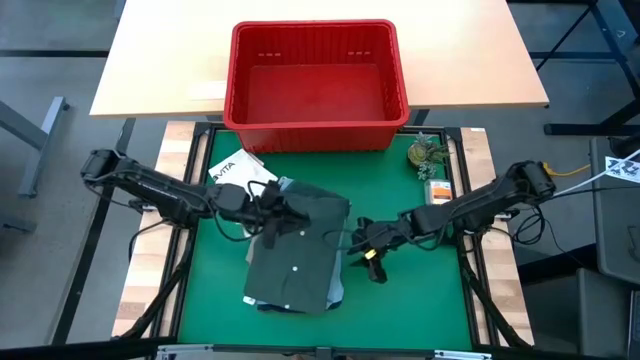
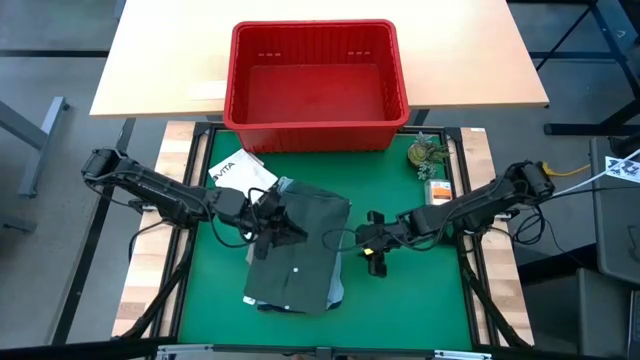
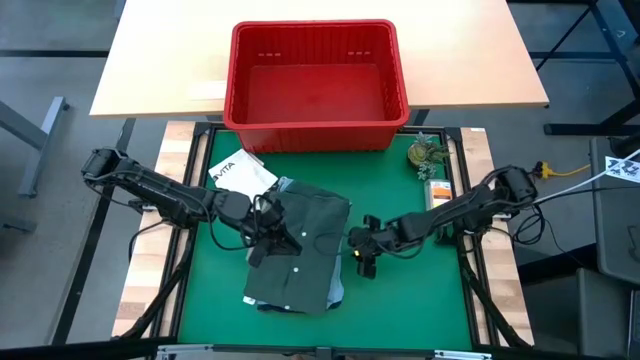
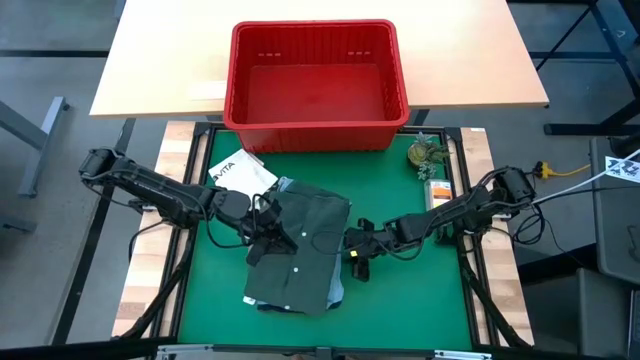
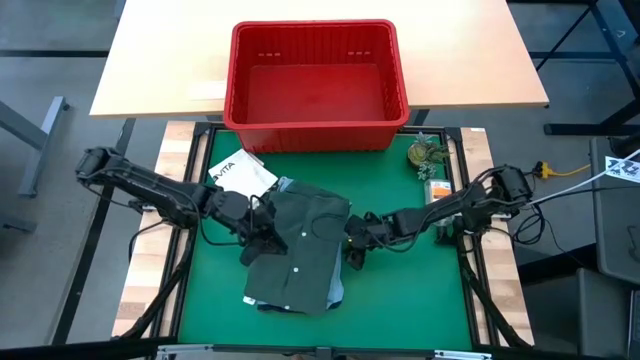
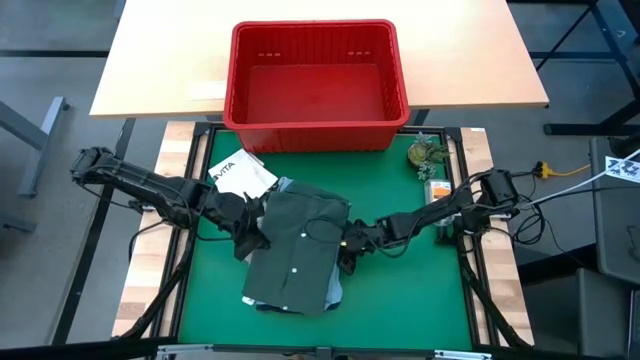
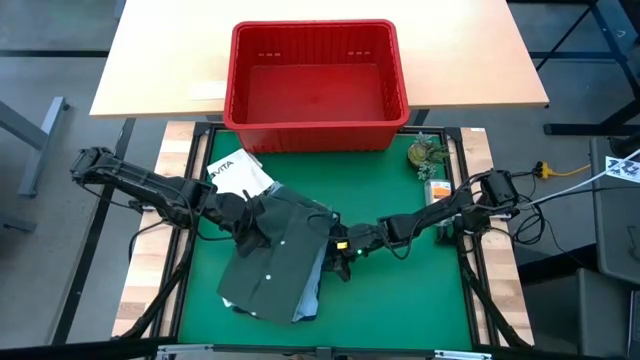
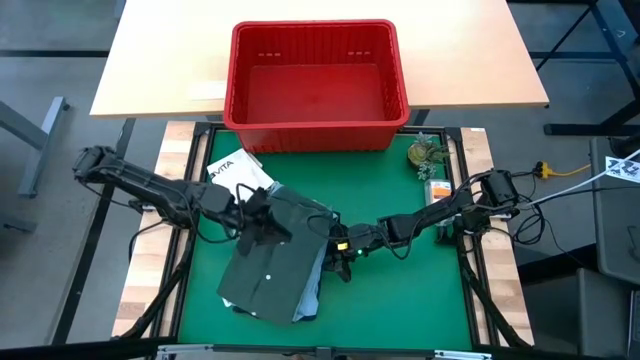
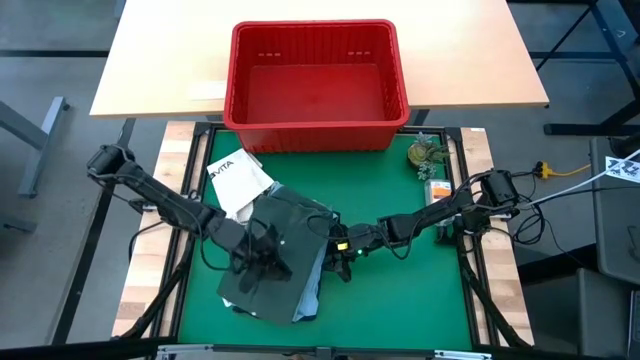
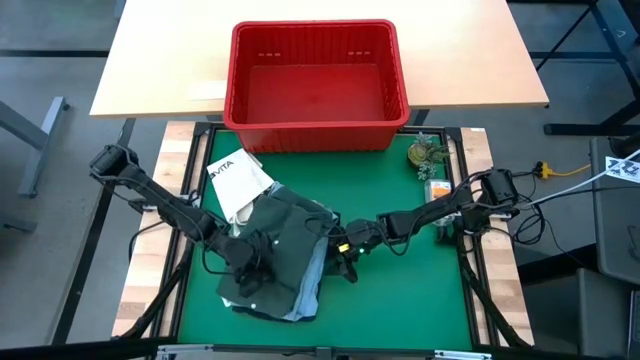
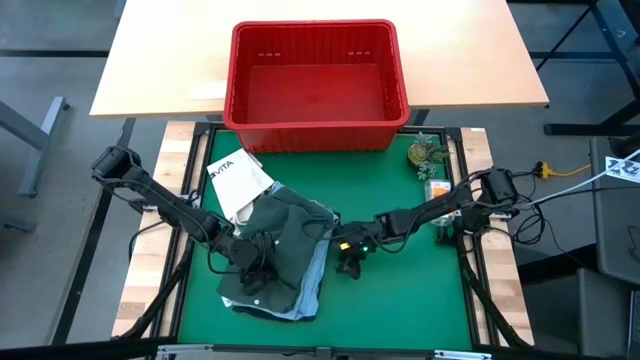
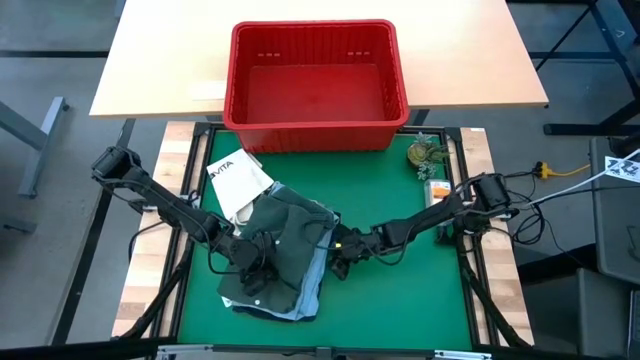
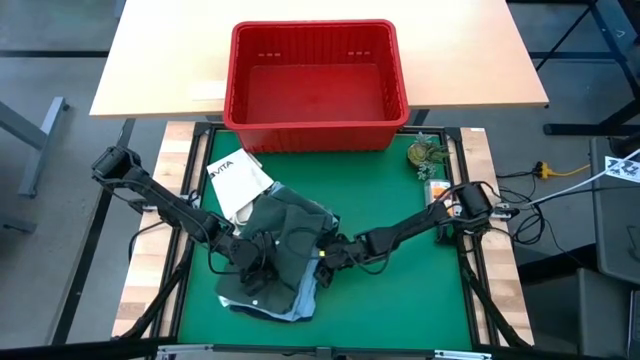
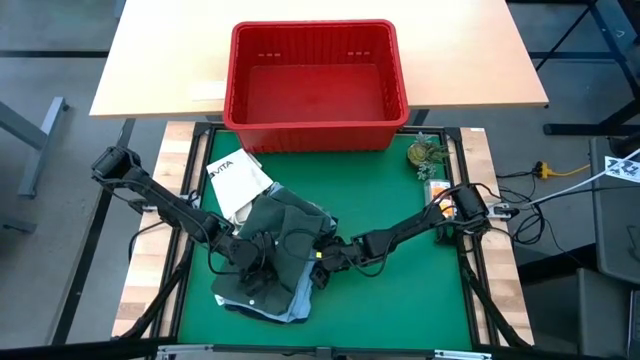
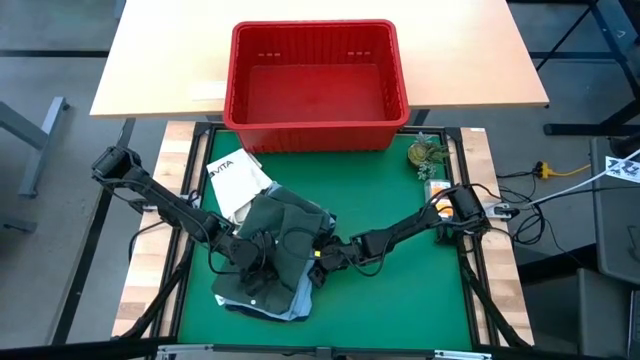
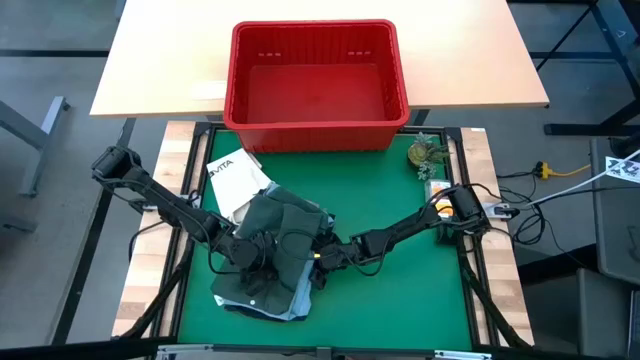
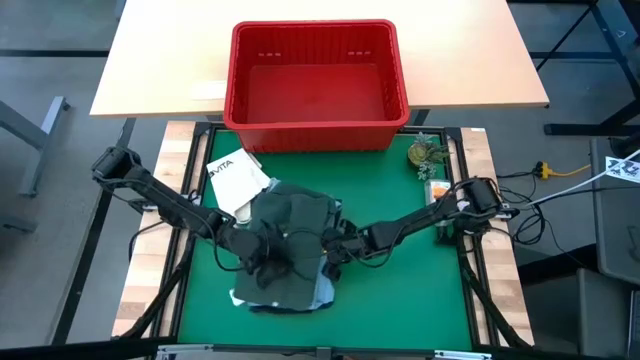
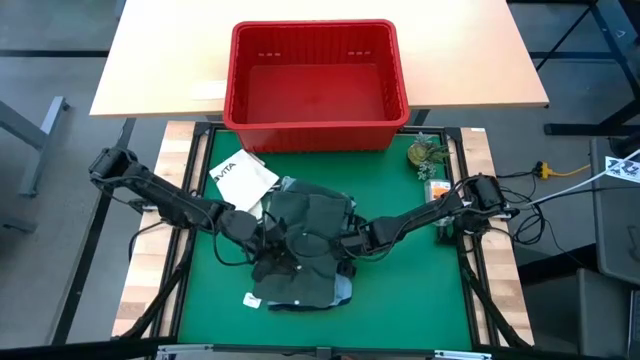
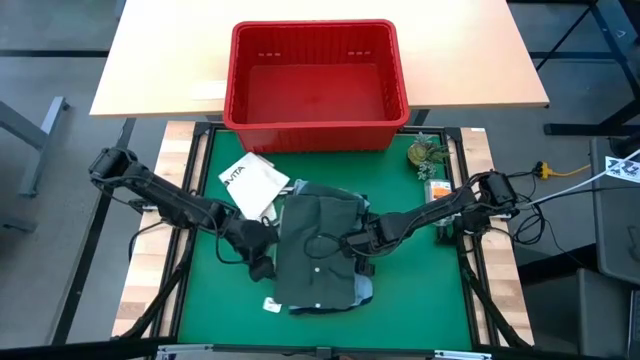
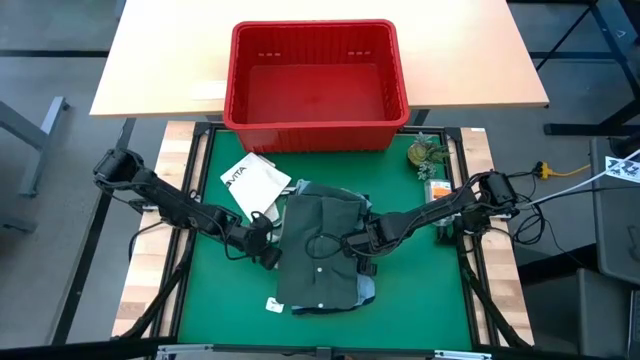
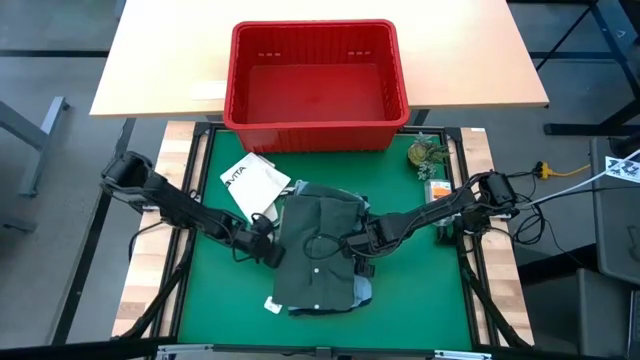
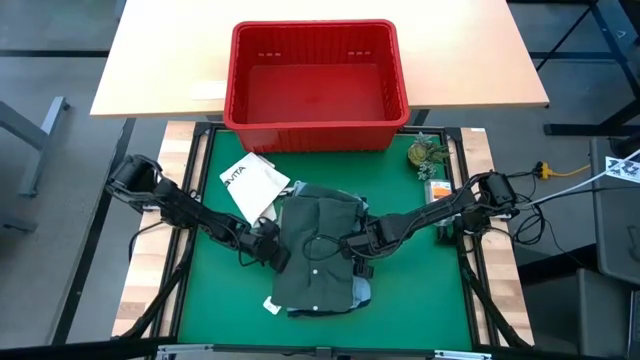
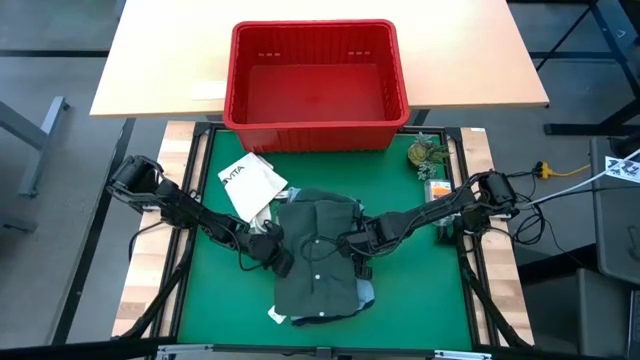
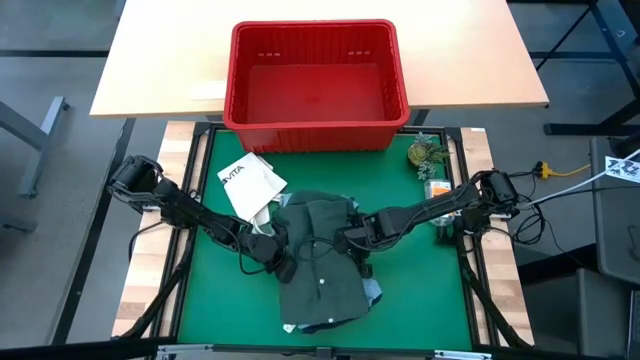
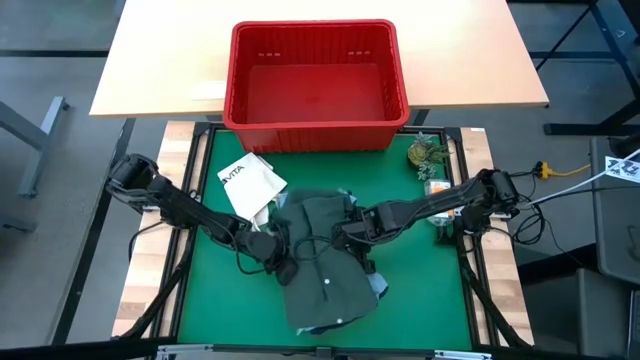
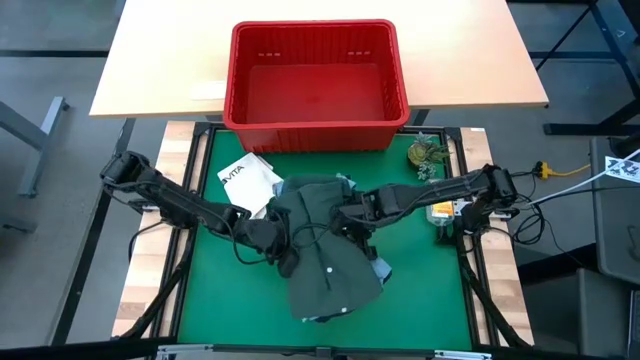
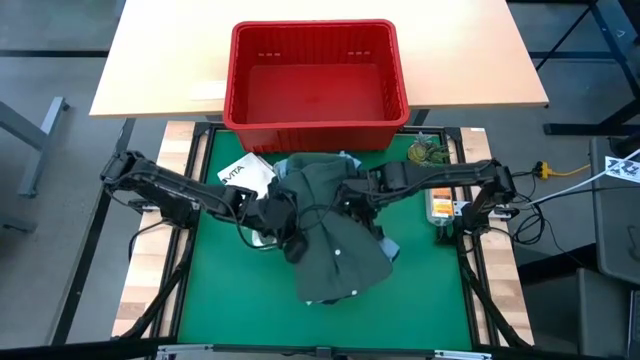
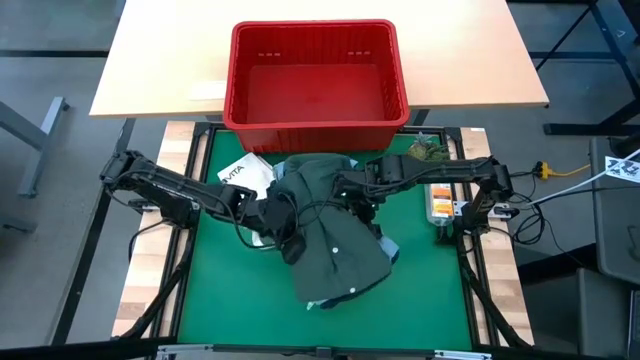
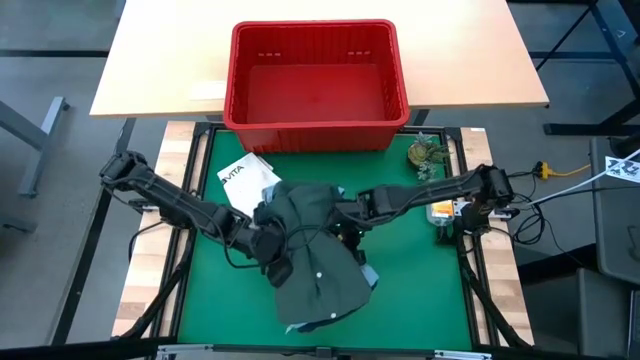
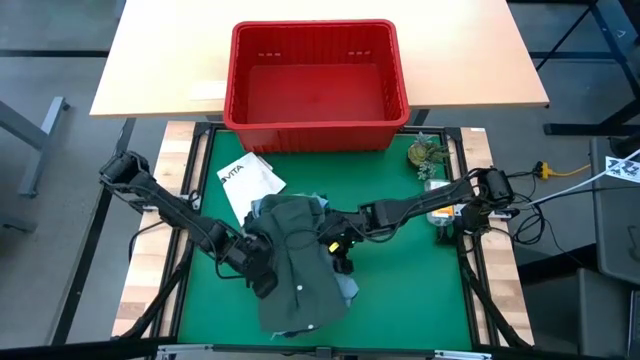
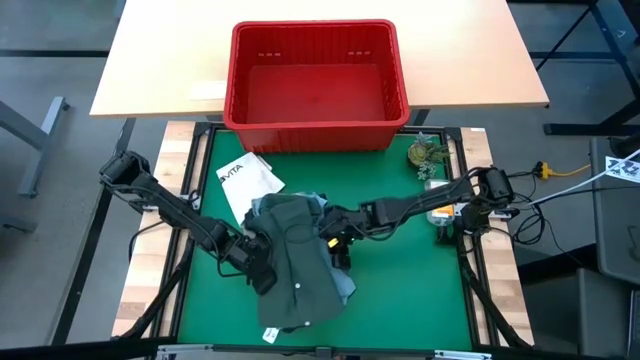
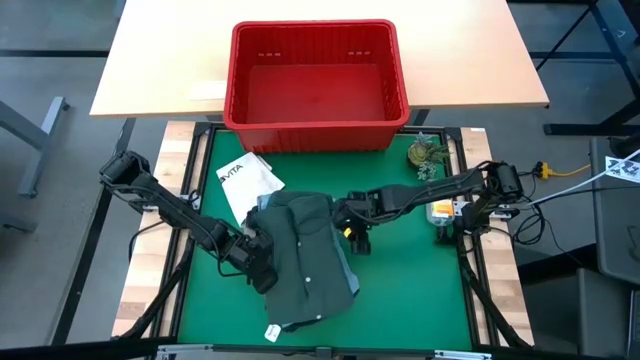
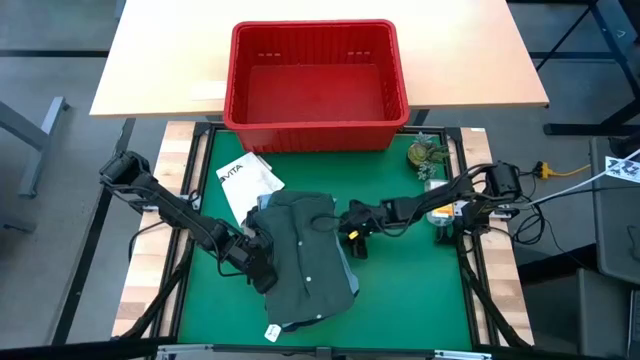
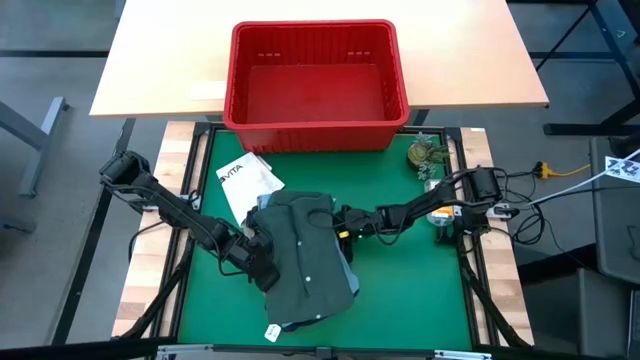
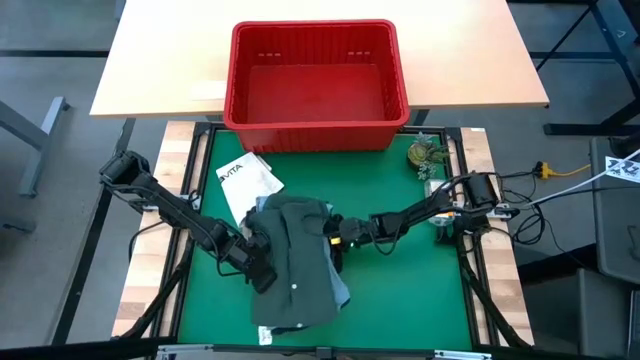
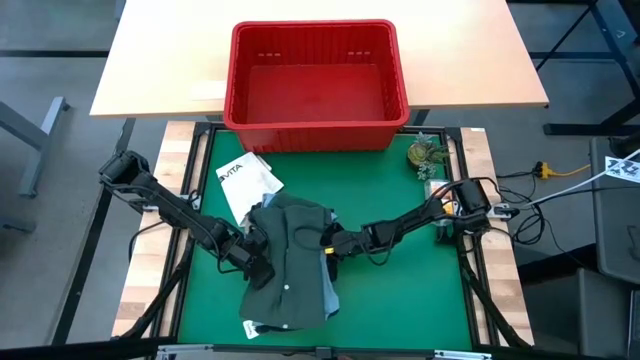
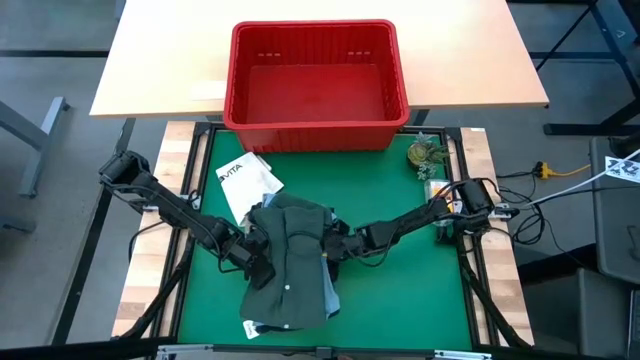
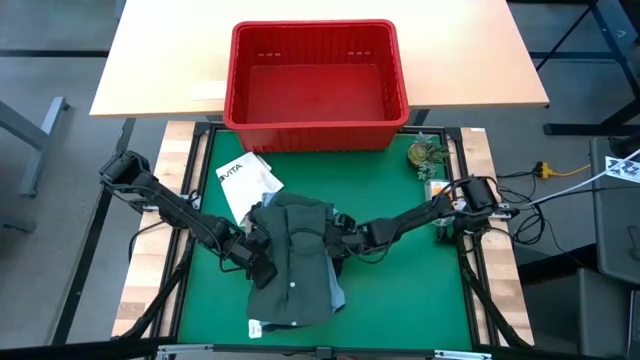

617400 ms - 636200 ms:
Task: Fold Laundry from Bin
Put the stacked clothing into the organizer bin
